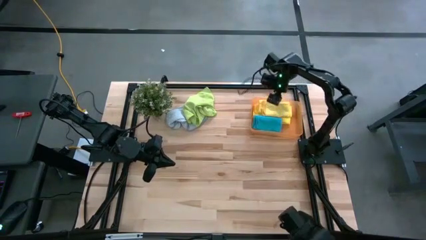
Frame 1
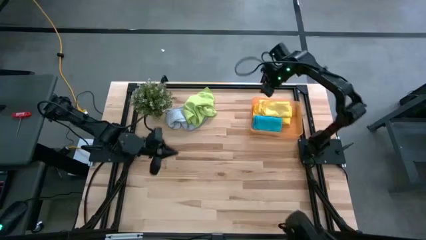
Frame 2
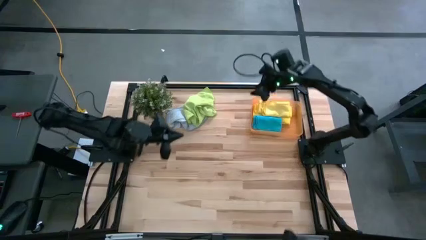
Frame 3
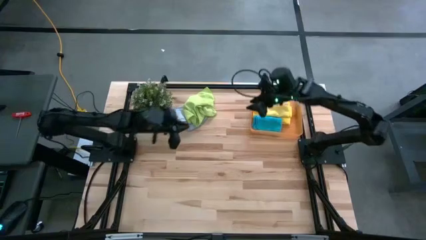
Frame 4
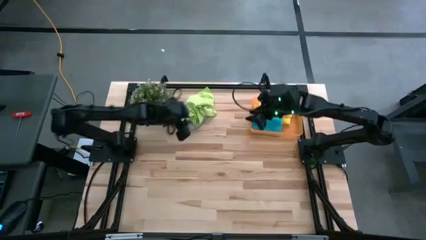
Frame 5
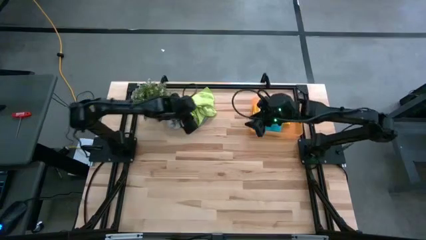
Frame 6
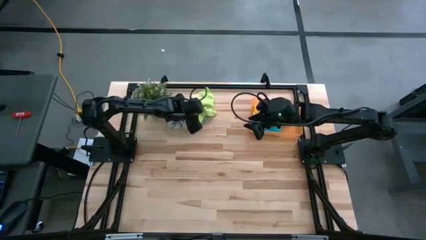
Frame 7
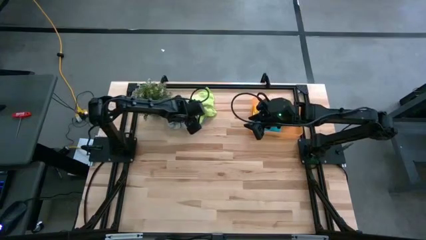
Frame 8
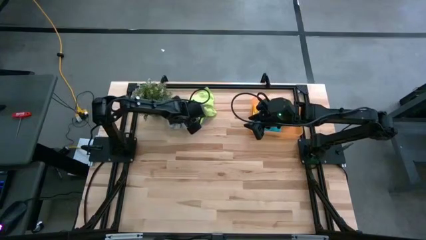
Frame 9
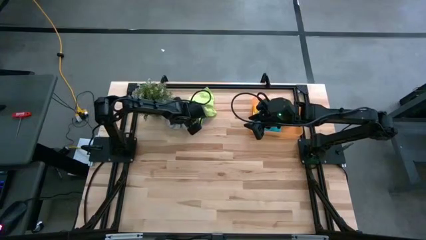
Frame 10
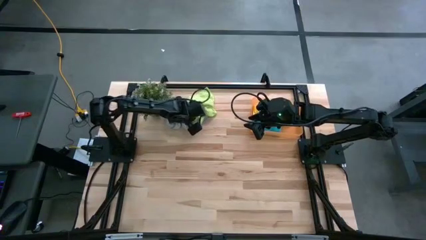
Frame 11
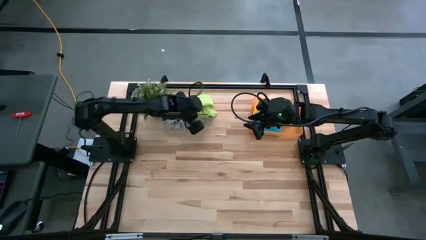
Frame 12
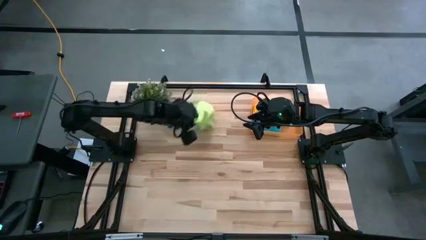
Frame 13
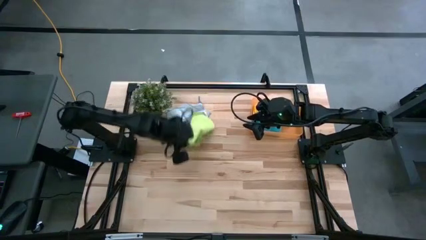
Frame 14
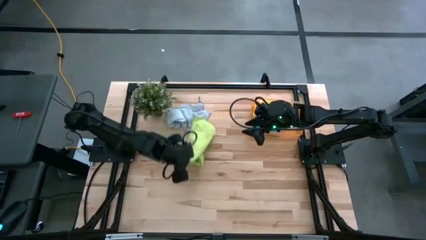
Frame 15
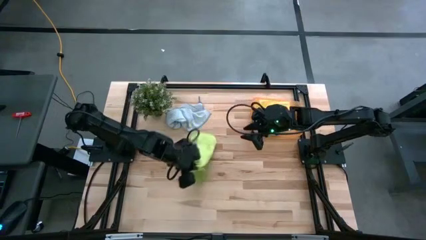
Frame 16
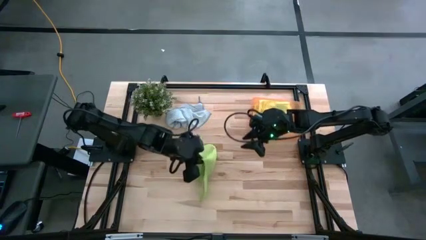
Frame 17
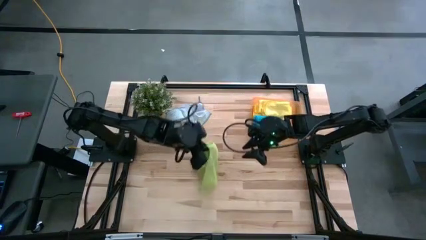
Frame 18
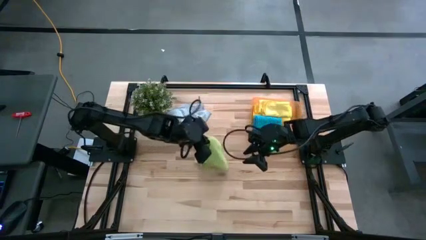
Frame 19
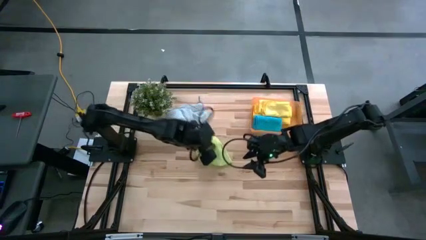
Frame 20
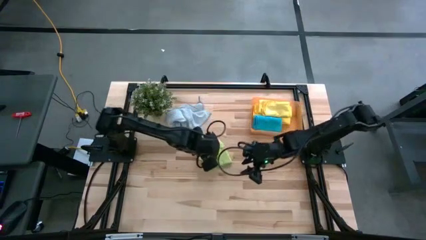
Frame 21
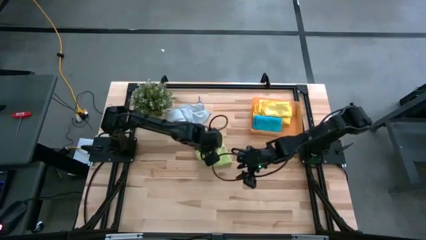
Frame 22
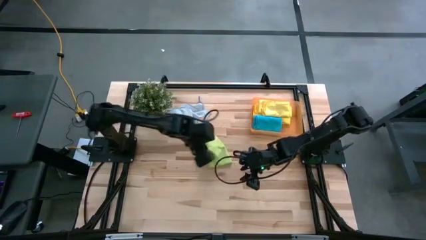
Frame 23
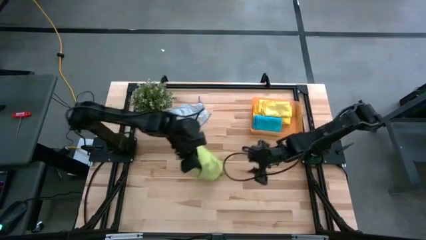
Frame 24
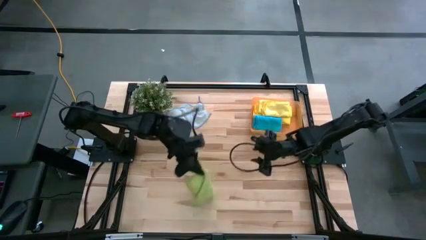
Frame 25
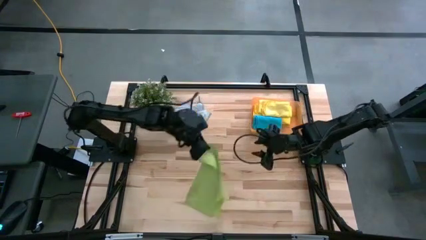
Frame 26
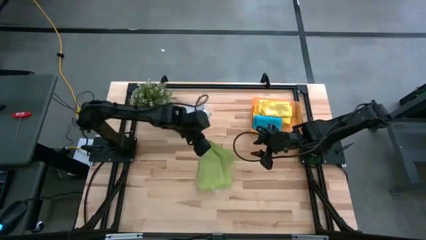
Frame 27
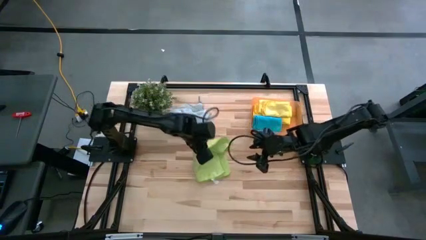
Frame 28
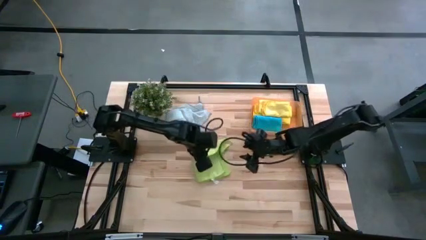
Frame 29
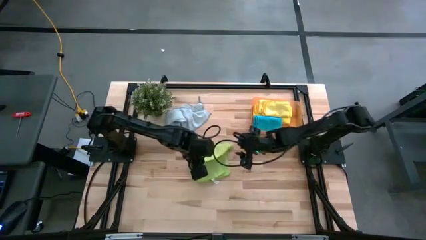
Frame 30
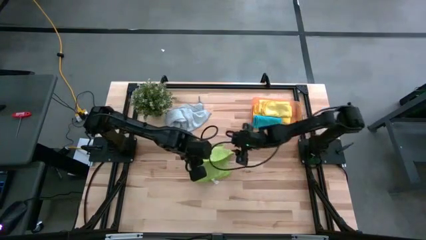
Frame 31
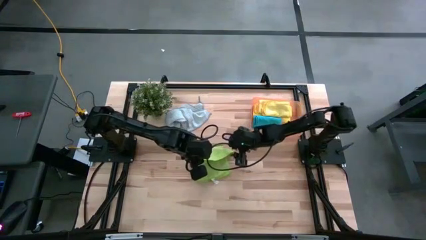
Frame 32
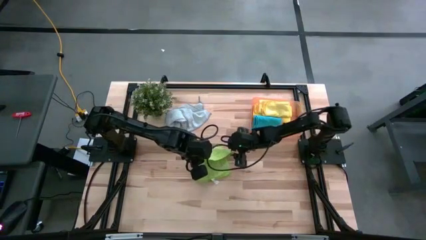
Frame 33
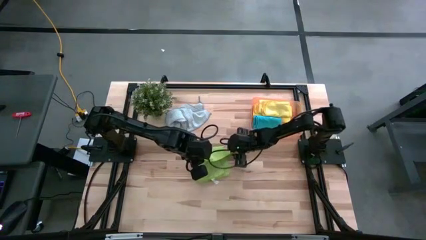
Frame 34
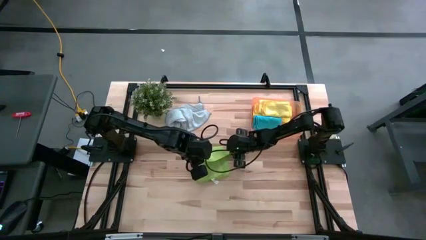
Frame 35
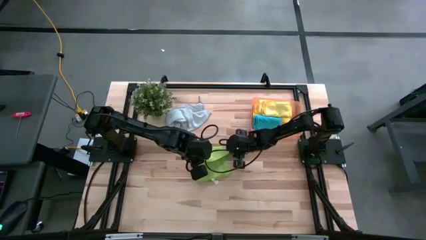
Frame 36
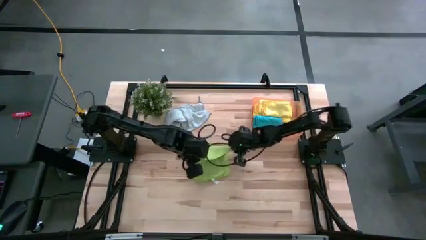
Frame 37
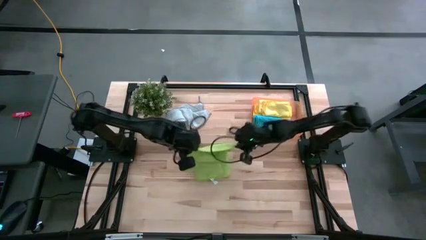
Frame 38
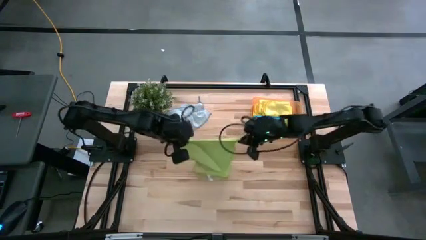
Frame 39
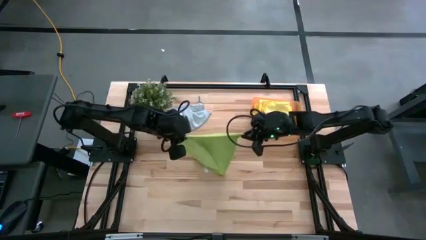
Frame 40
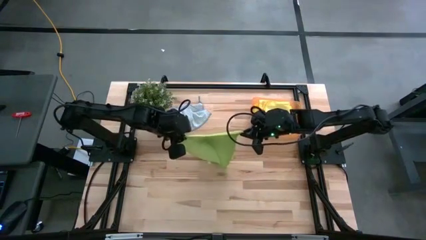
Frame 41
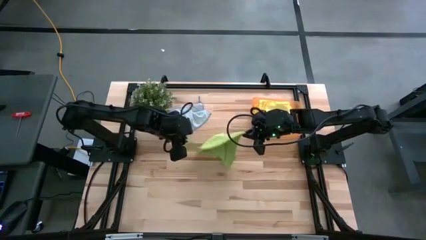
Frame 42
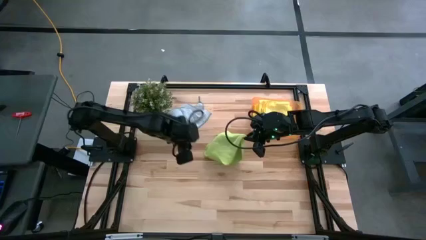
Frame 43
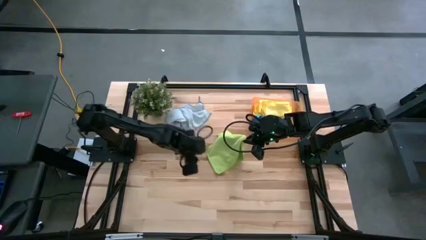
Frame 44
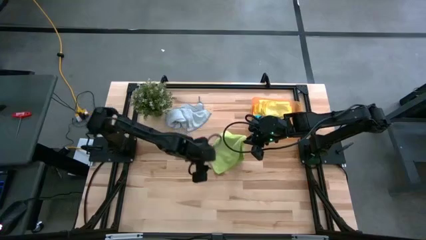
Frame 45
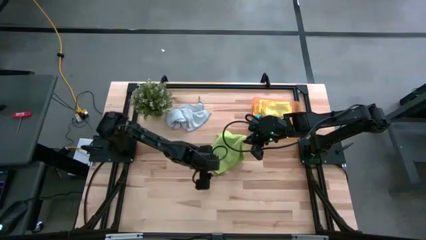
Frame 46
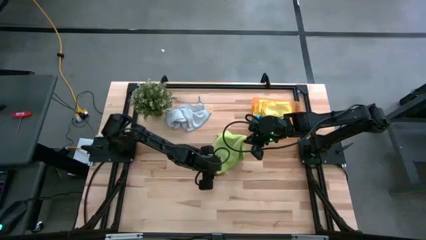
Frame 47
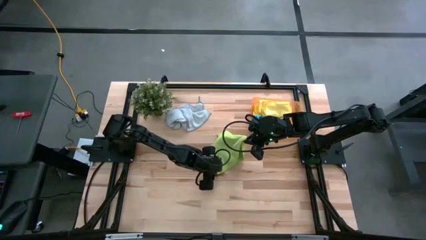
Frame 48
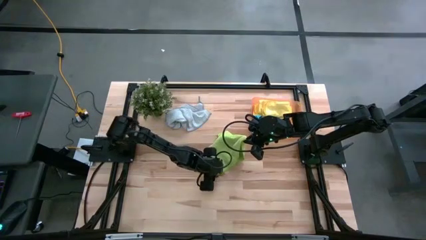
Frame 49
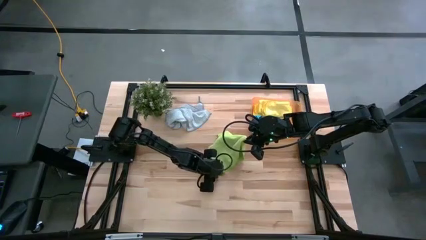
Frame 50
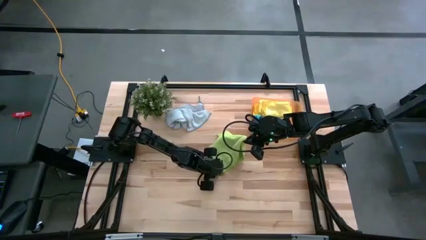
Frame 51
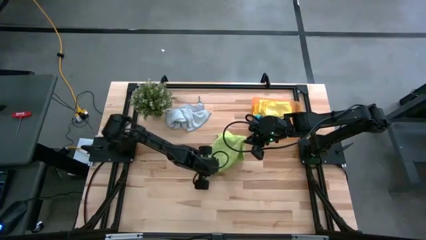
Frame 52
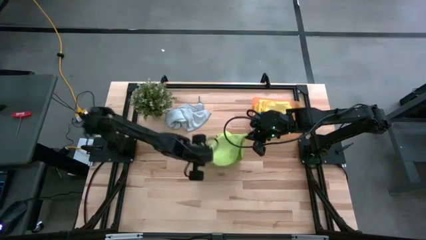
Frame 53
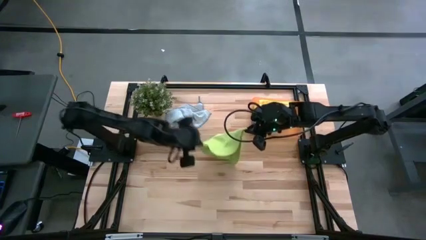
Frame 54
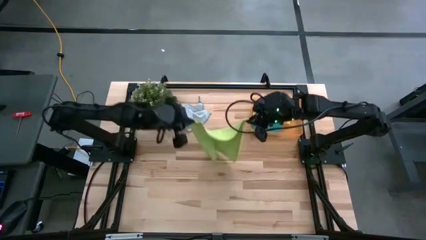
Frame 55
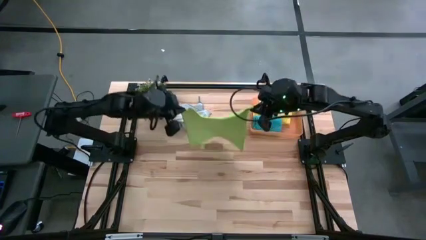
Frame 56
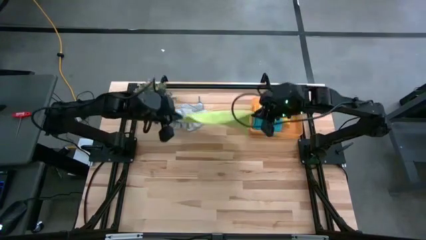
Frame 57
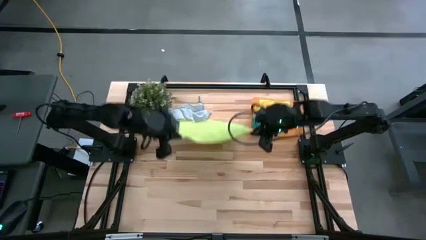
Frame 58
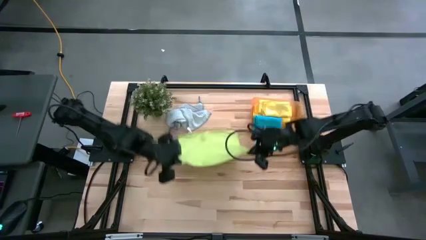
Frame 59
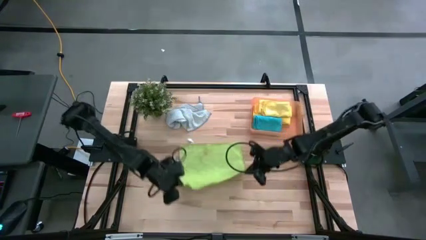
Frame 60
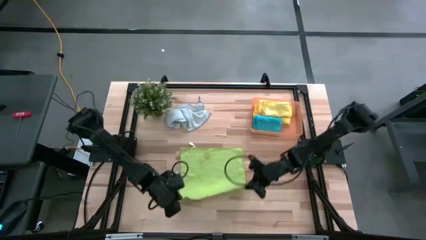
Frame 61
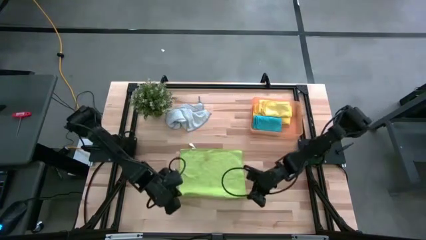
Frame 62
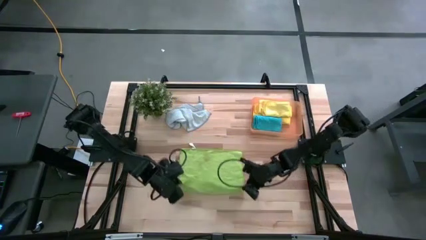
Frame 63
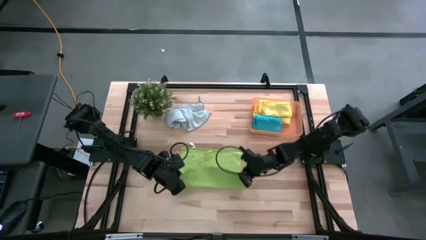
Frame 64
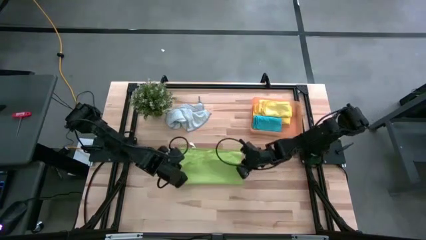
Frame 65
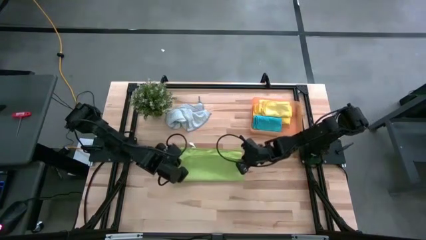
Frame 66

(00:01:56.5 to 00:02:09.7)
Task: Fold microfiber towels
Fold the green microfiber cloth

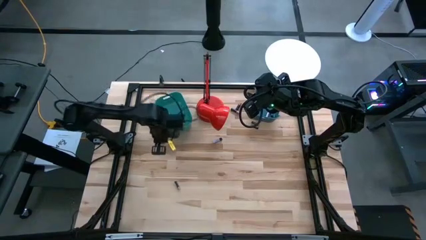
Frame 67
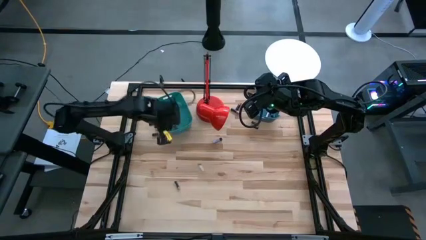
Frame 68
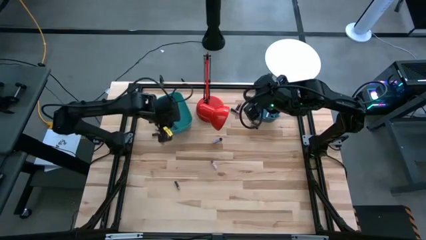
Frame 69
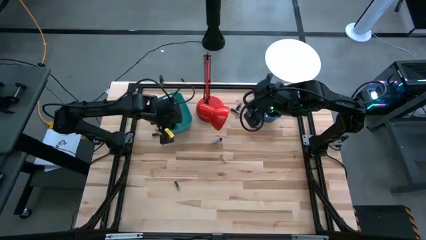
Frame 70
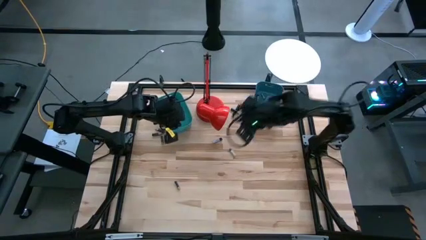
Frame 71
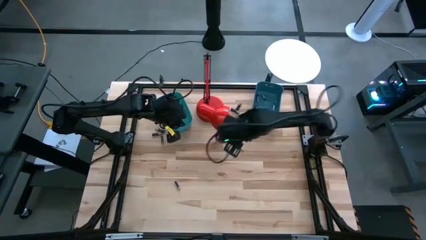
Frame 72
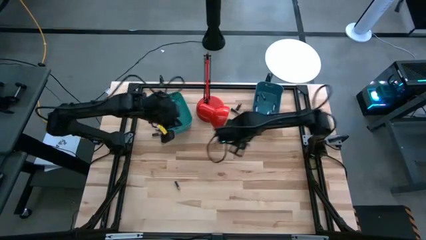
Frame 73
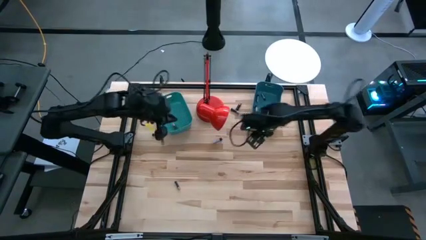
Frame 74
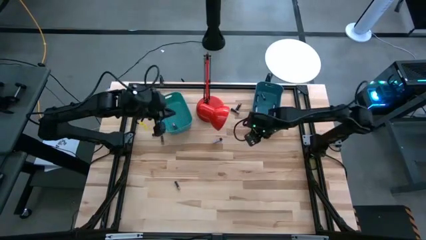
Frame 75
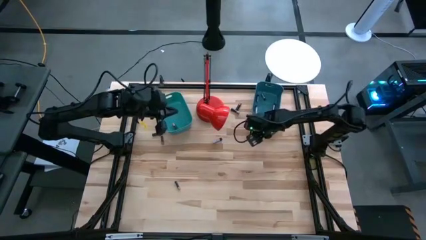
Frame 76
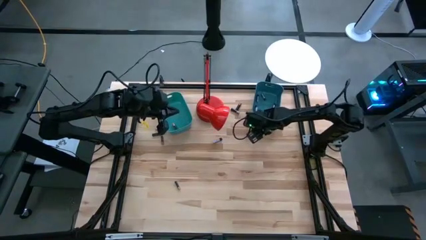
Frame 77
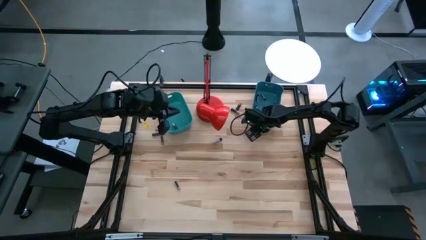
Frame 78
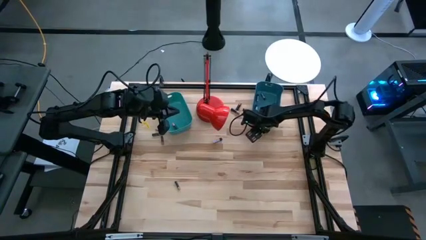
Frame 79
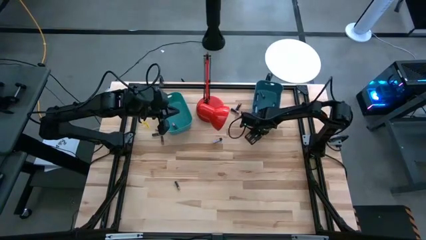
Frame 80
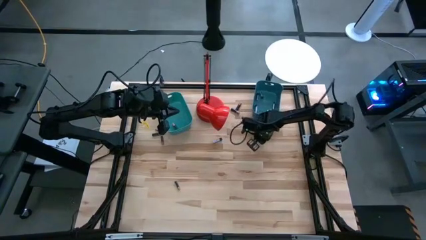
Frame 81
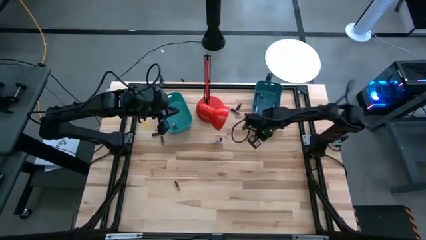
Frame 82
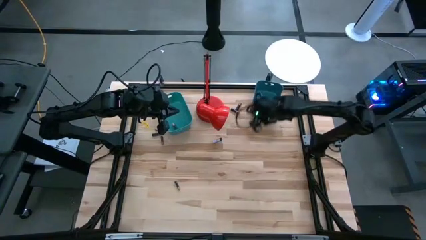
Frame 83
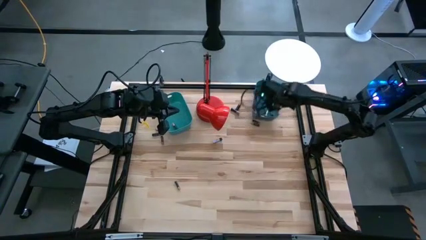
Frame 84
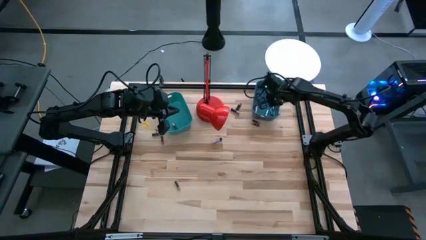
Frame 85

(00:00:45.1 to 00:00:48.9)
Task: Sort batteries
Put the silver battery into the blue bin
